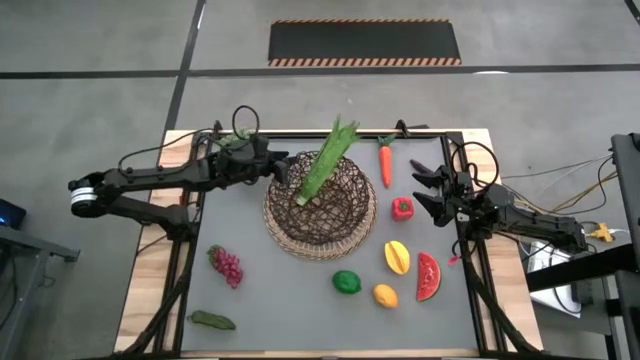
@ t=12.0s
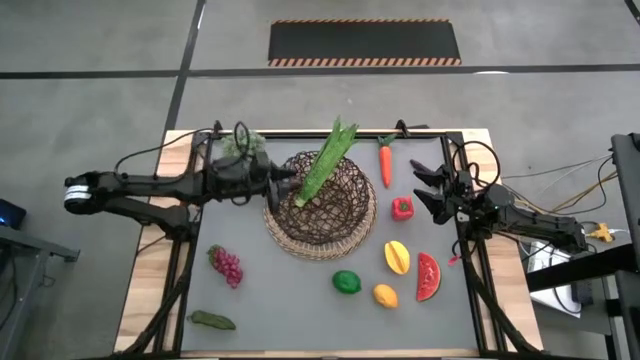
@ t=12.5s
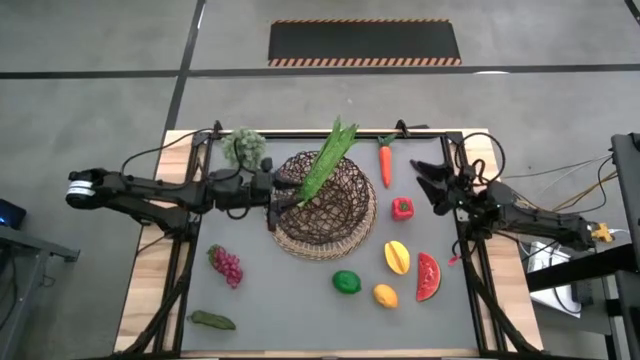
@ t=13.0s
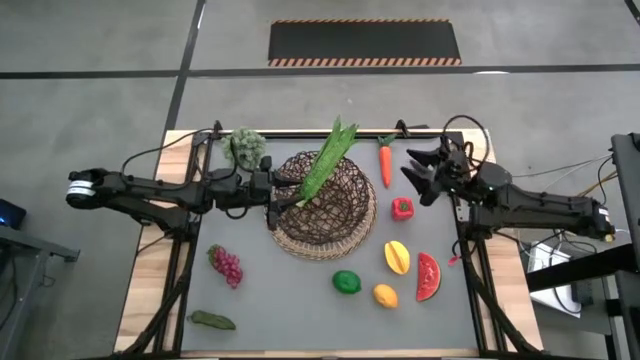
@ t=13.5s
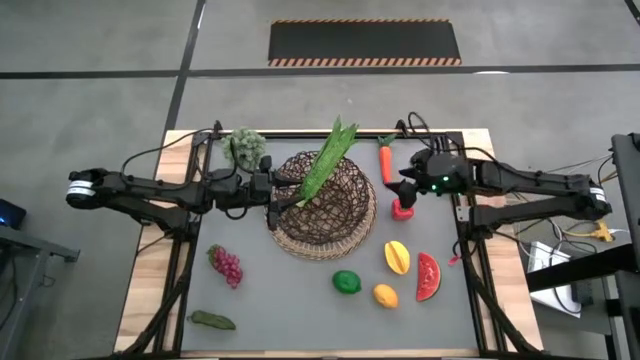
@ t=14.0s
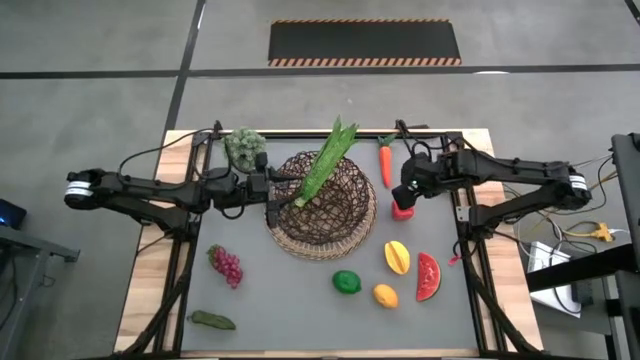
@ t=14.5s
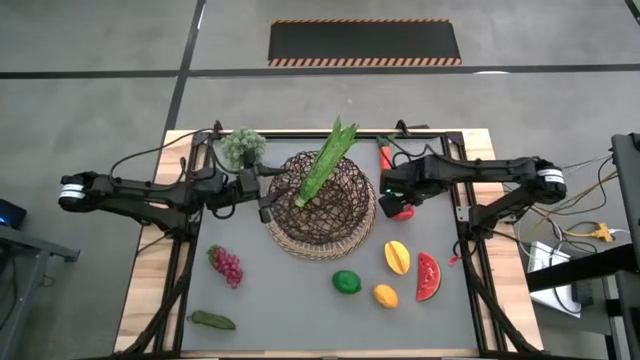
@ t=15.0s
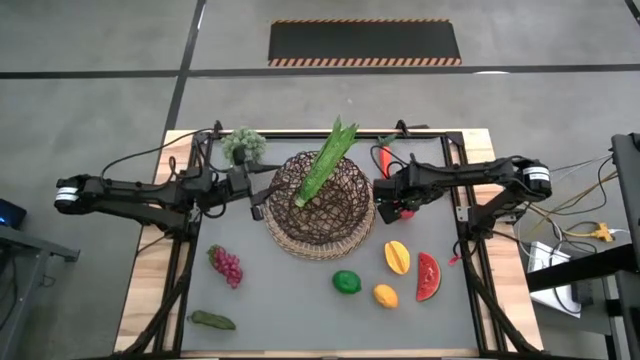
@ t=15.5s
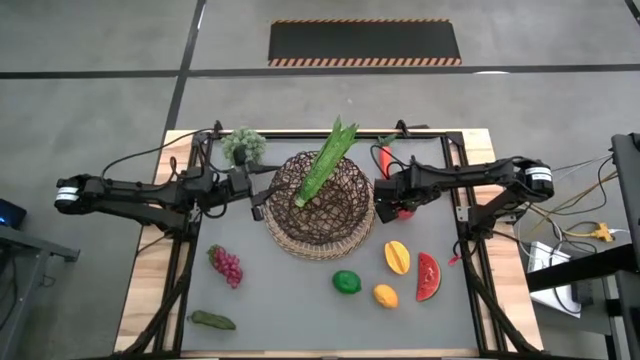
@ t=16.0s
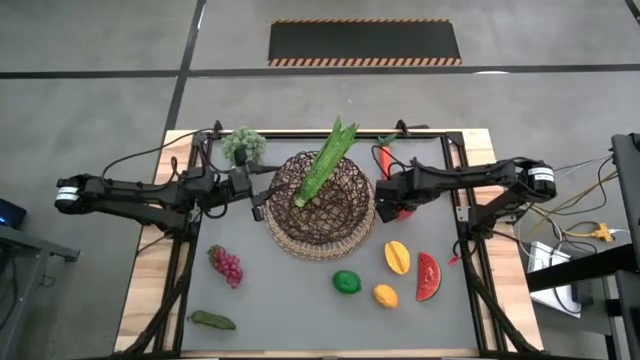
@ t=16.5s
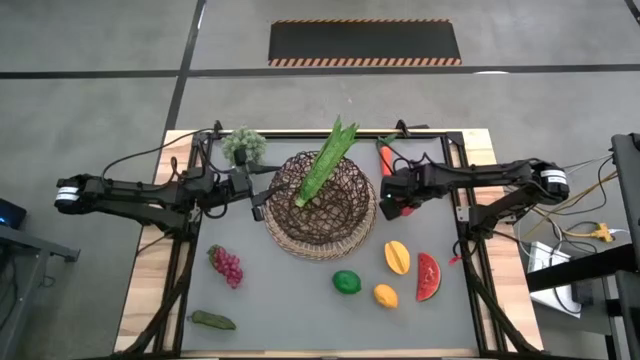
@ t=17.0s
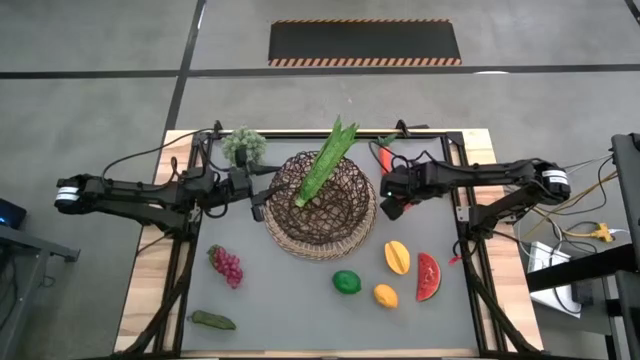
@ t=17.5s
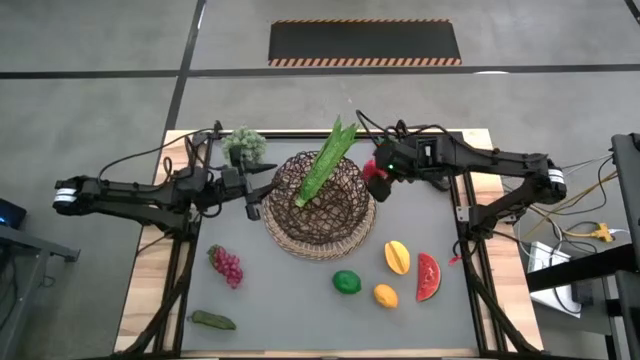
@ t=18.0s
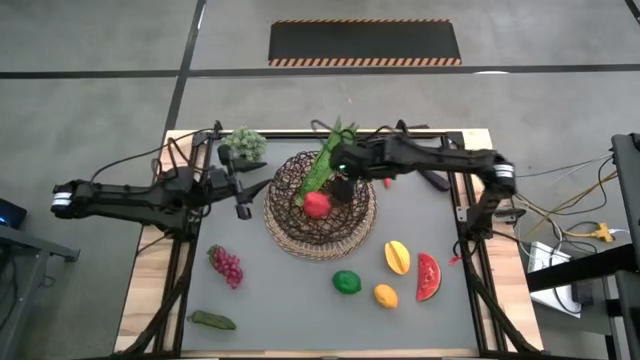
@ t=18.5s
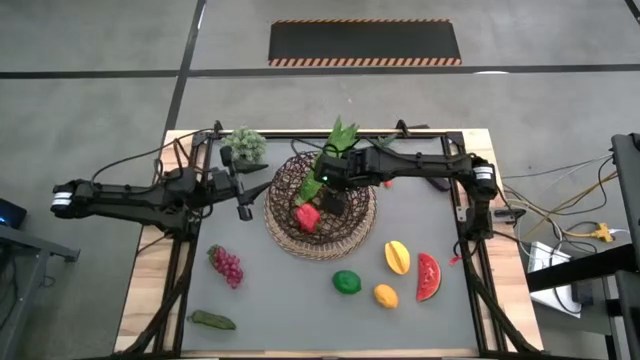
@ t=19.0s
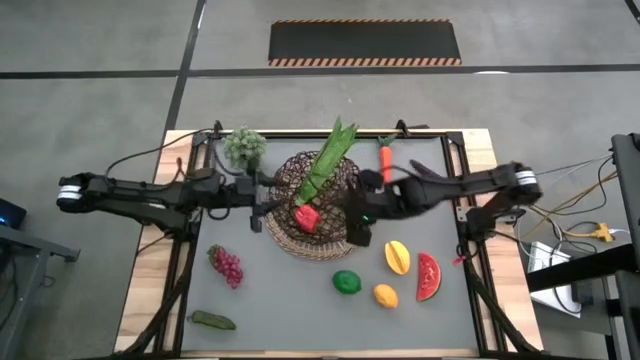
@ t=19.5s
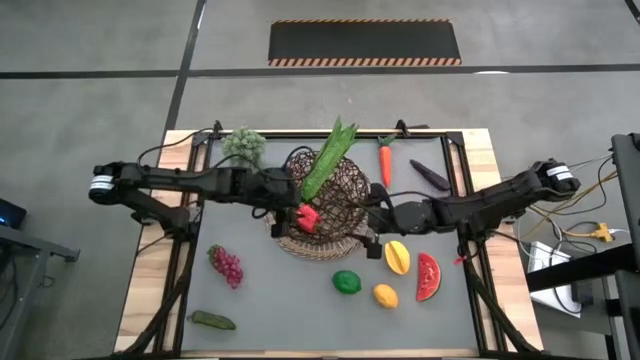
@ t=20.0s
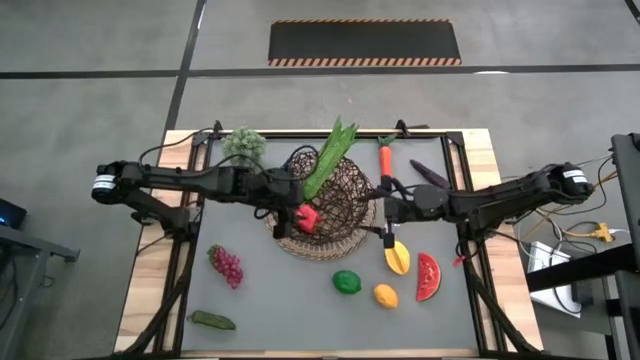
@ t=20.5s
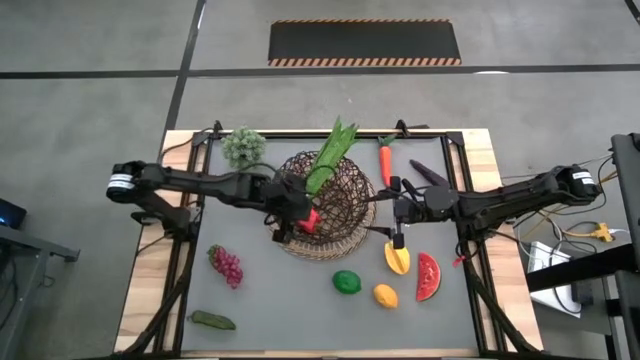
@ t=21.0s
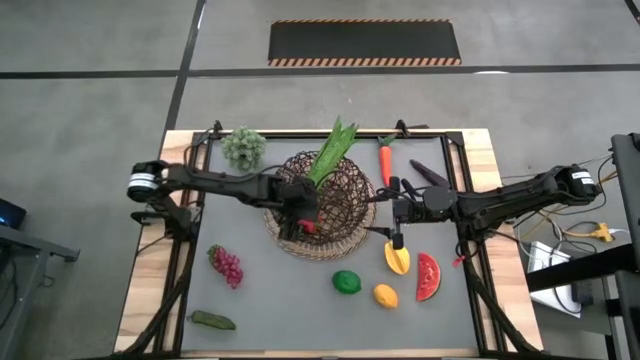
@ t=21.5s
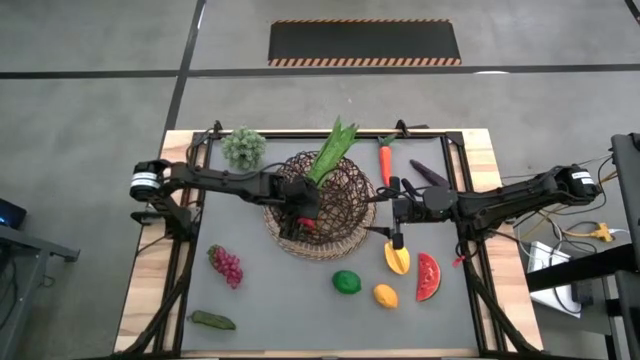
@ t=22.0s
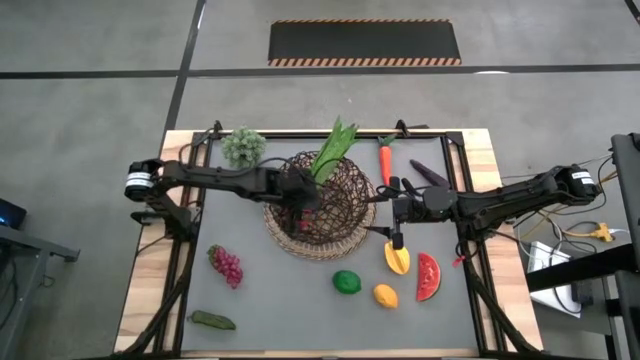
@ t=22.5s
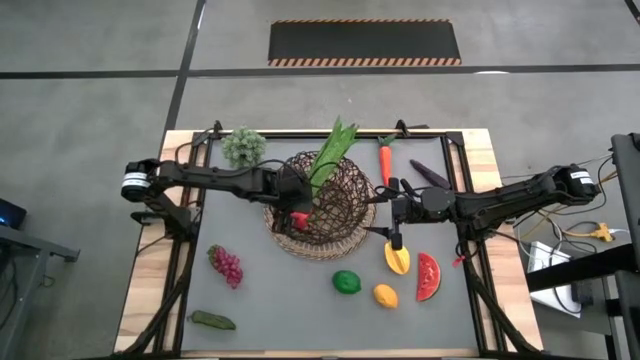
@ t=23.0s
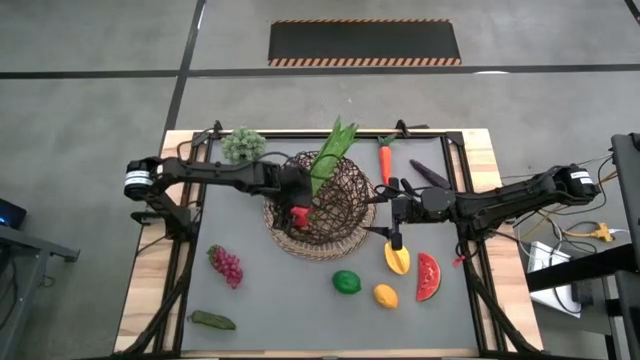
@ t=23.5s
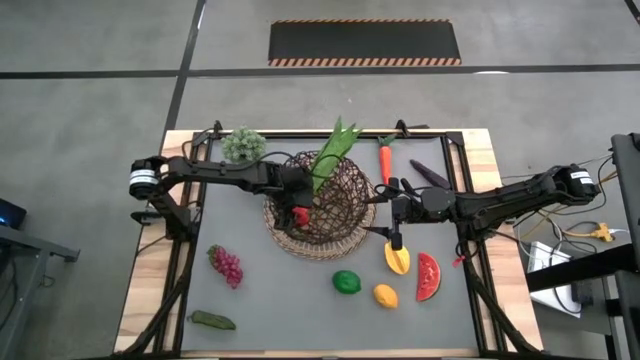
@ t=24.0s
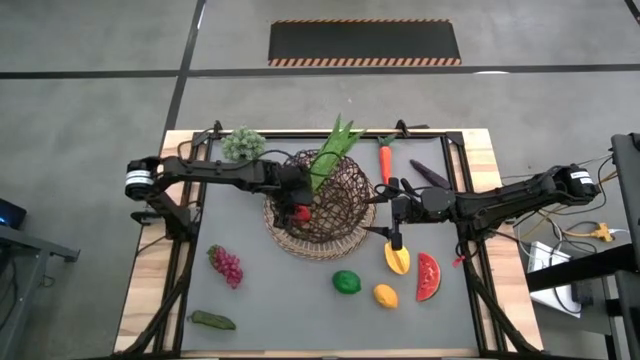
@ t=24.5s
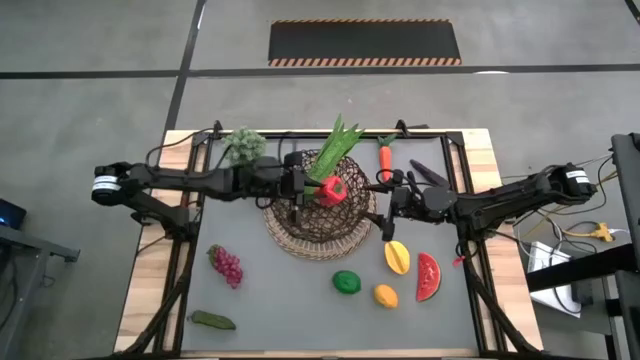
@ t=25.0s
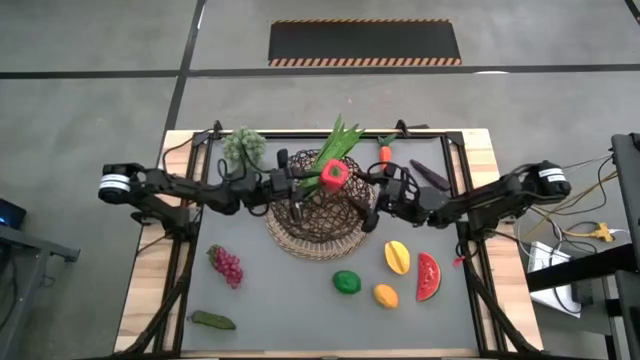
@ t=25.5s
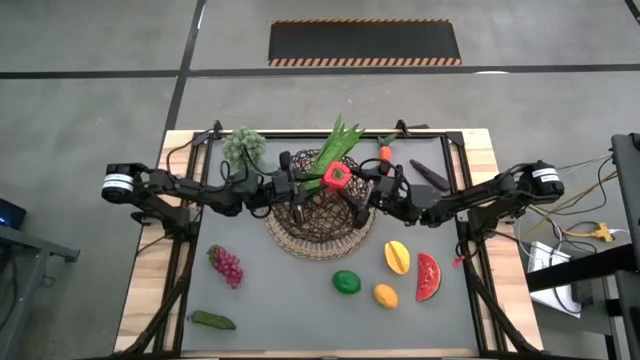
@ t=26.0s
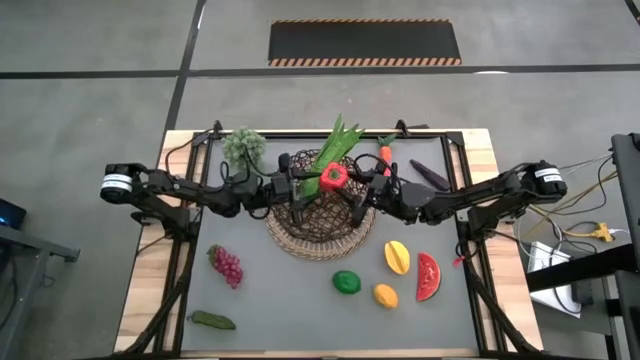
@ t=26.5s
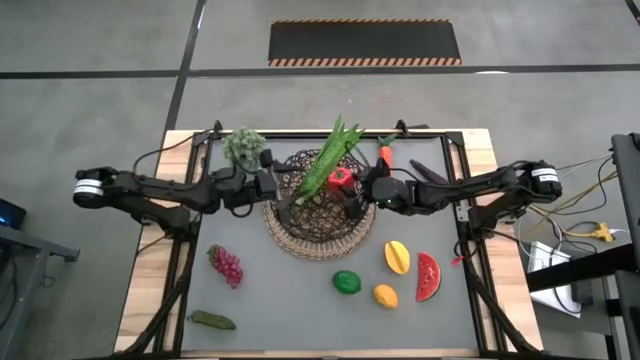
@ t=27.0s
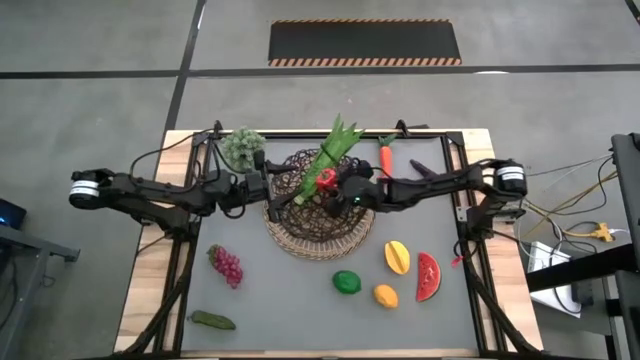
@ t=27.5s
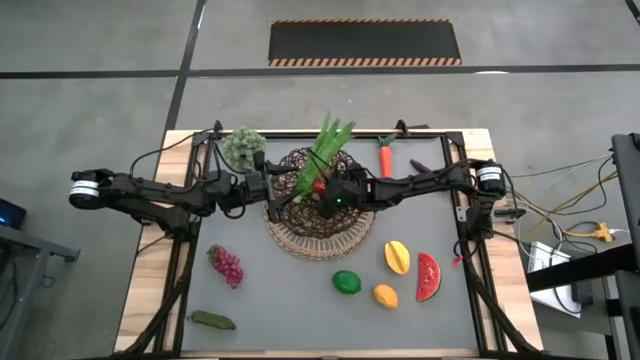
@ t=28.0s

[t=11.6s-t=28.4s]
Task: Build produce basket
Put the red bell pepper into the basket

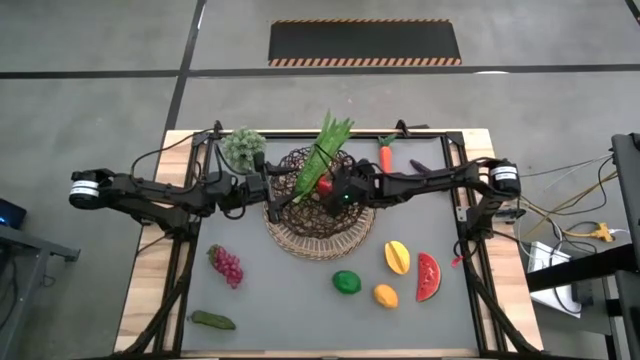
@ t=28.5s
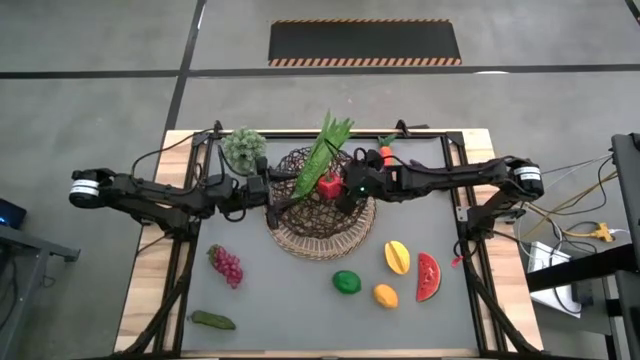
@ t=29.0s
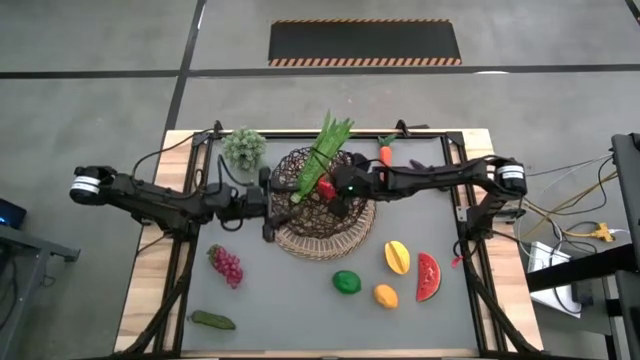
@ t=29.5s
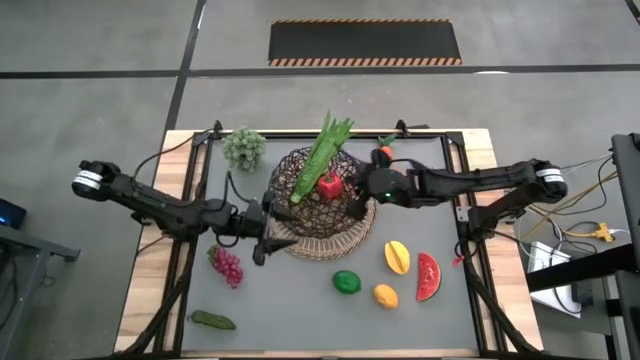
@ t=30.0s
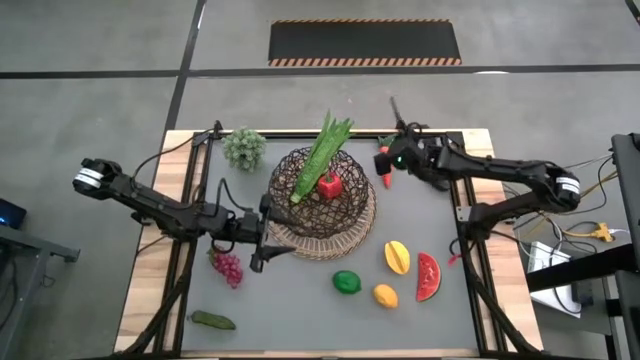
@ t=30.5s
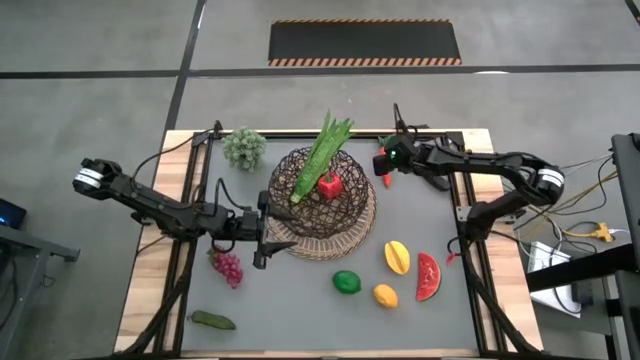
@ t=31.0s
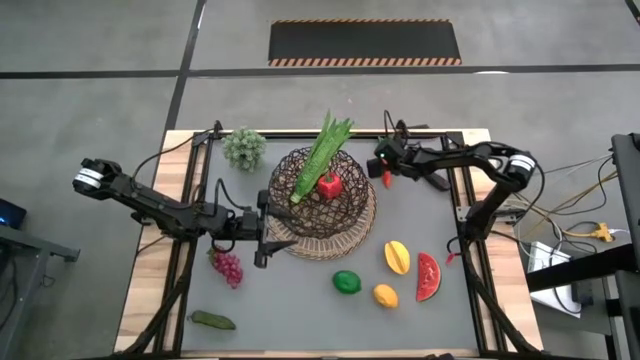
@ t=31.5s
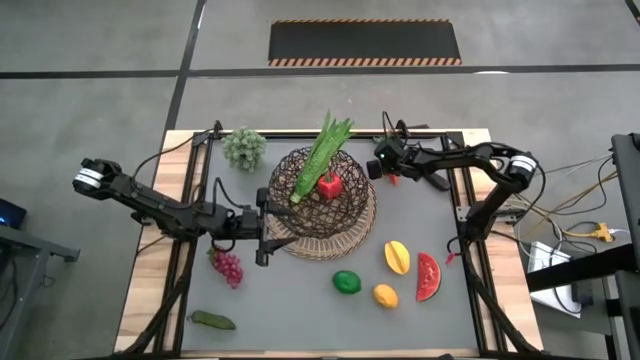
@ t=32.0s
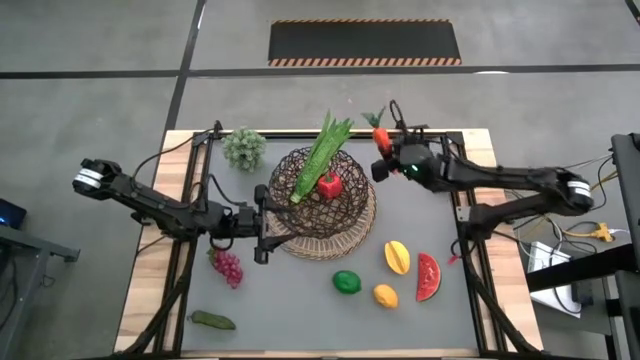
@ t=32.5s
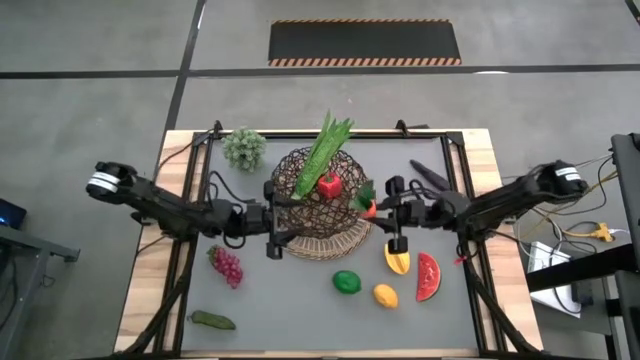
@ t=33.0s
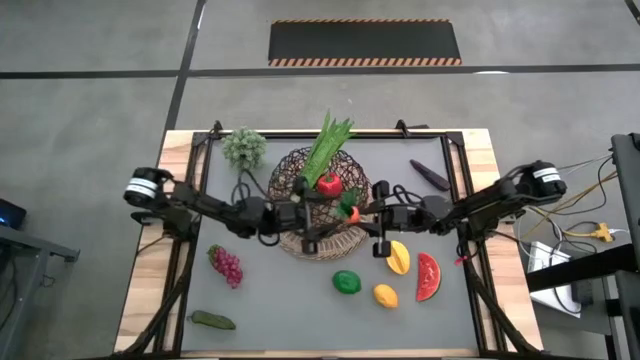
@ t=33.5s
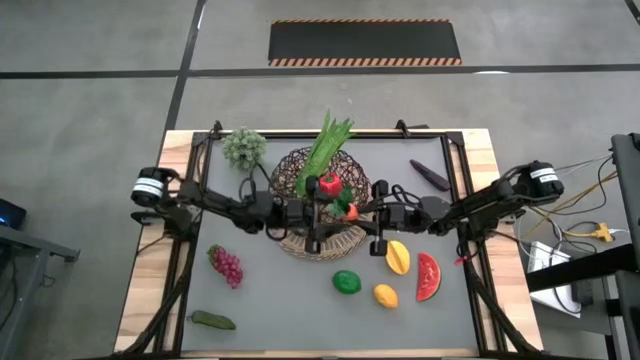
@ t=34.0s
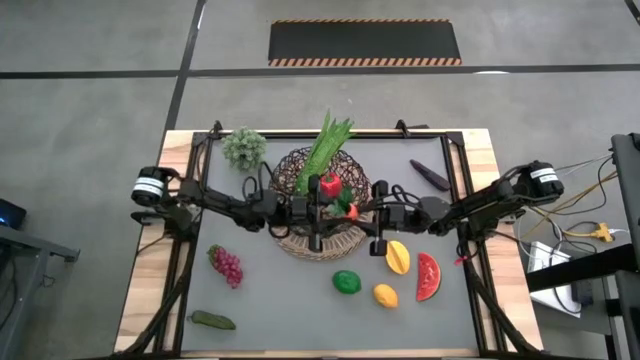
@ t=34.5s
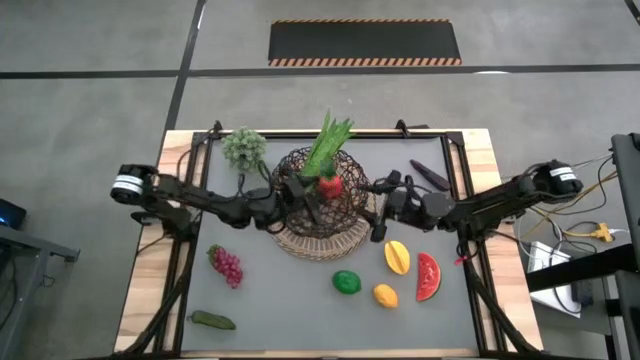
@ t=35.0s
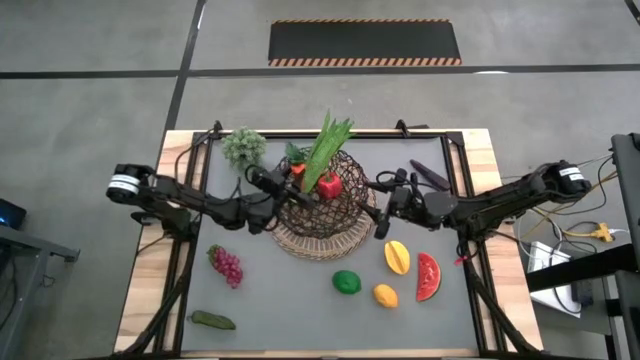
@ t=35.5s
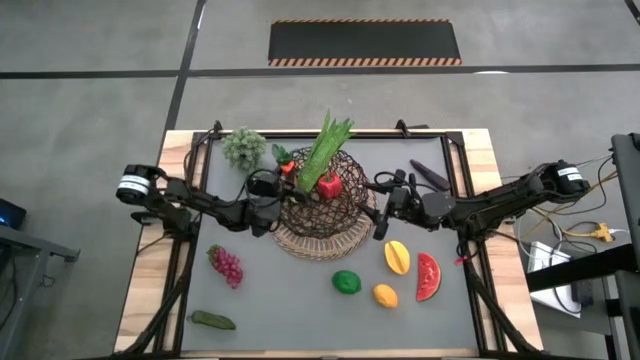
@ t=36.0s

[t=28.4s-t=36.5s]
Put the orange carrot into the basket
